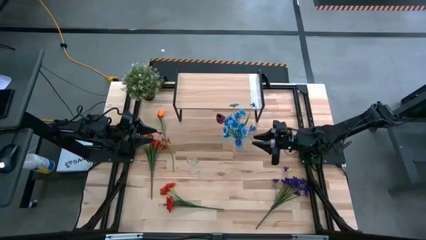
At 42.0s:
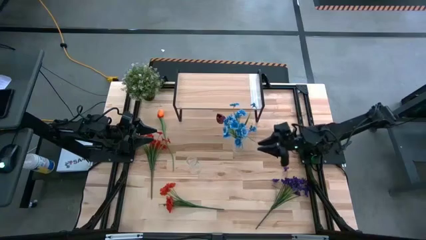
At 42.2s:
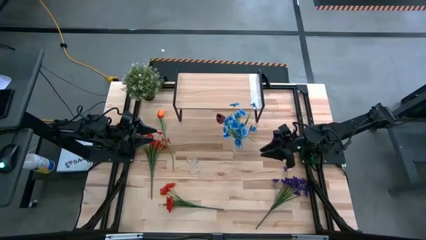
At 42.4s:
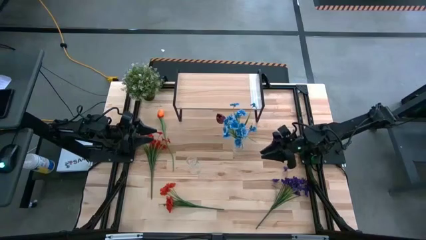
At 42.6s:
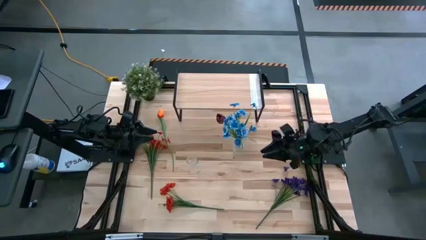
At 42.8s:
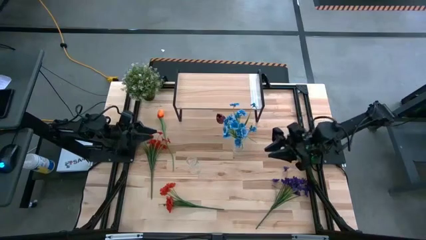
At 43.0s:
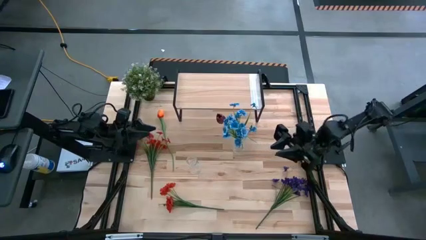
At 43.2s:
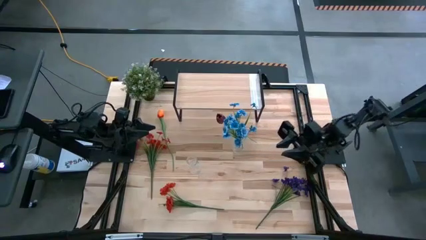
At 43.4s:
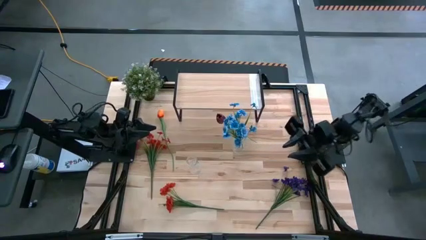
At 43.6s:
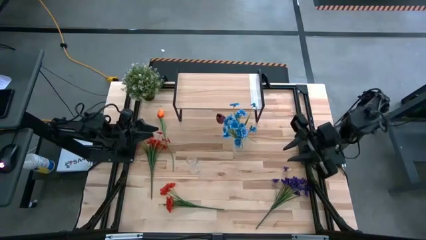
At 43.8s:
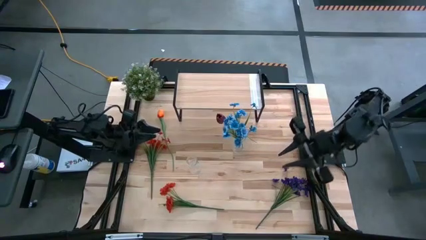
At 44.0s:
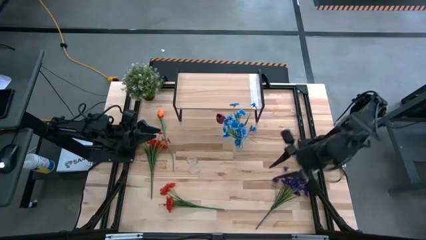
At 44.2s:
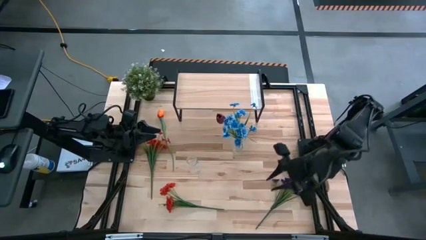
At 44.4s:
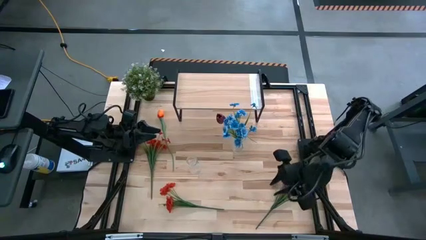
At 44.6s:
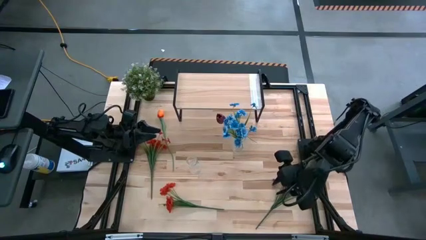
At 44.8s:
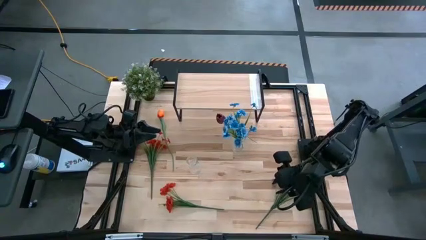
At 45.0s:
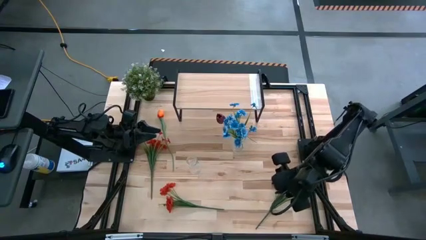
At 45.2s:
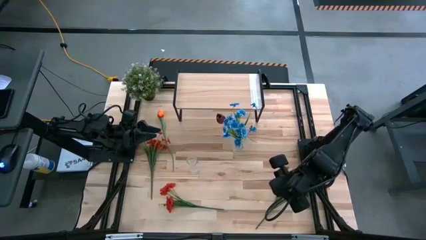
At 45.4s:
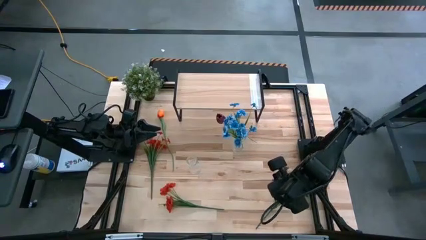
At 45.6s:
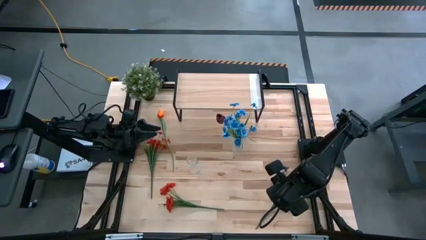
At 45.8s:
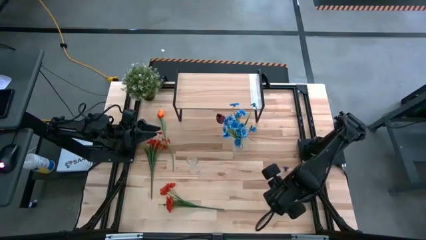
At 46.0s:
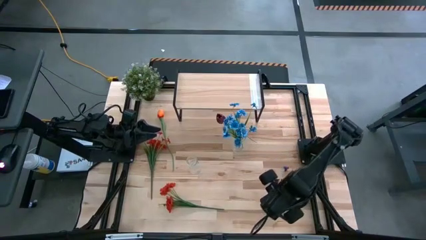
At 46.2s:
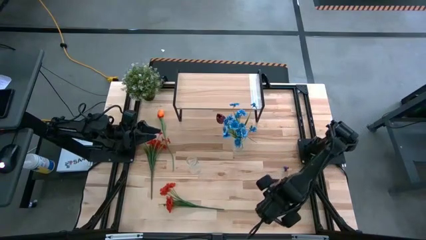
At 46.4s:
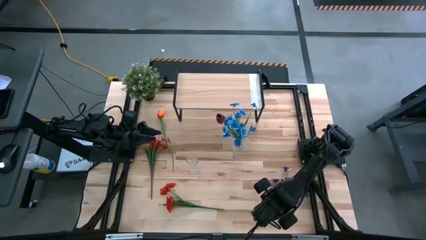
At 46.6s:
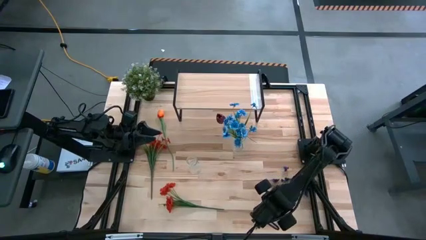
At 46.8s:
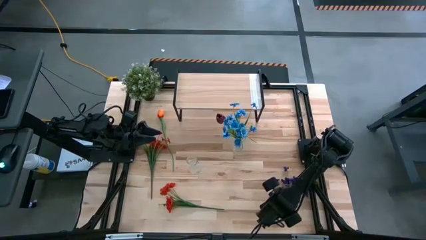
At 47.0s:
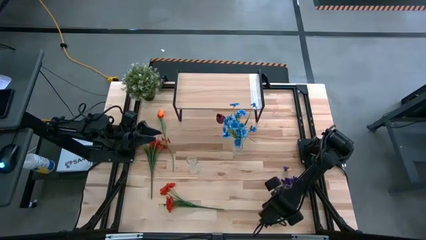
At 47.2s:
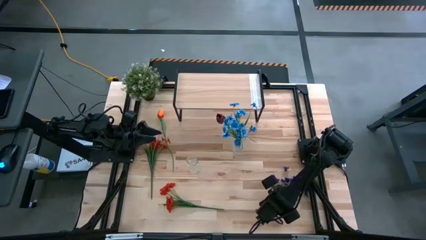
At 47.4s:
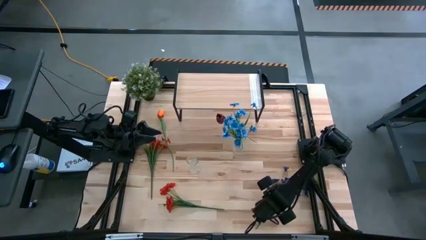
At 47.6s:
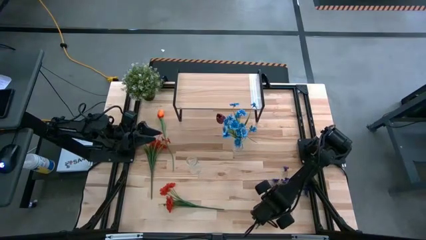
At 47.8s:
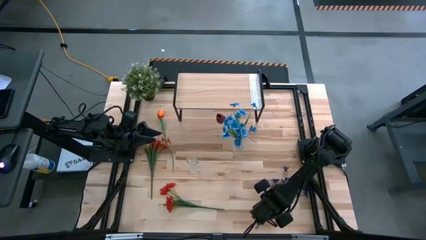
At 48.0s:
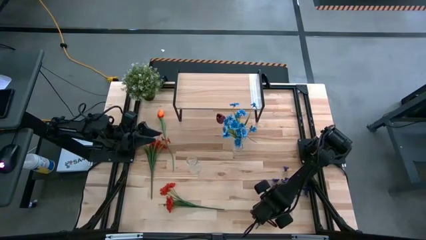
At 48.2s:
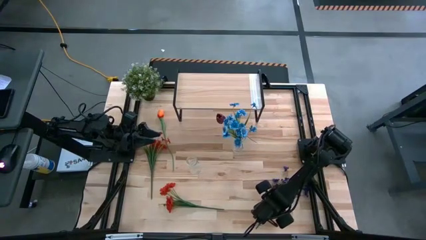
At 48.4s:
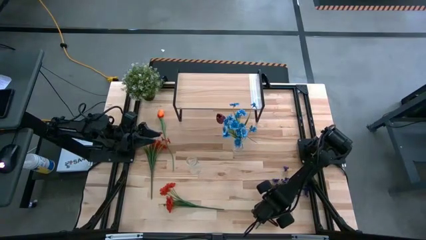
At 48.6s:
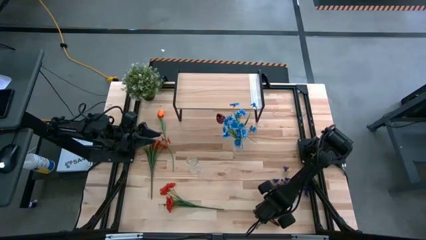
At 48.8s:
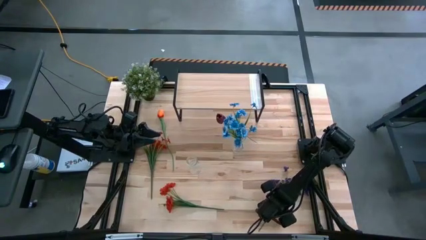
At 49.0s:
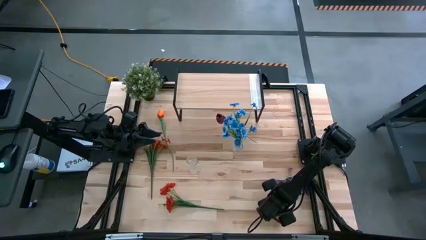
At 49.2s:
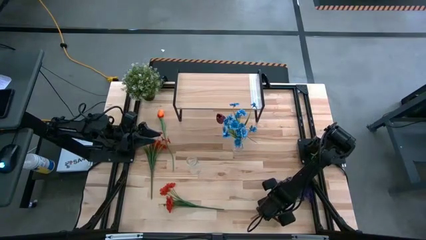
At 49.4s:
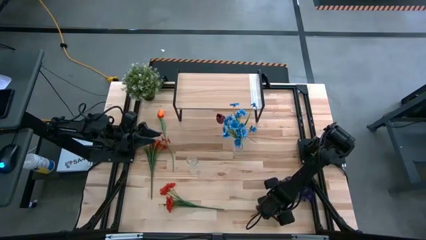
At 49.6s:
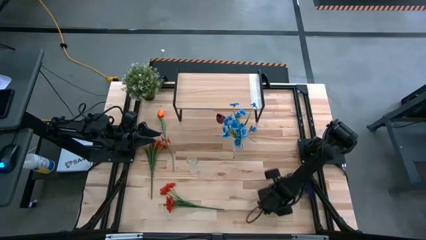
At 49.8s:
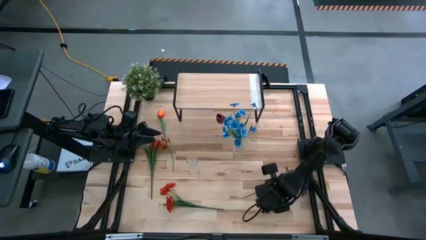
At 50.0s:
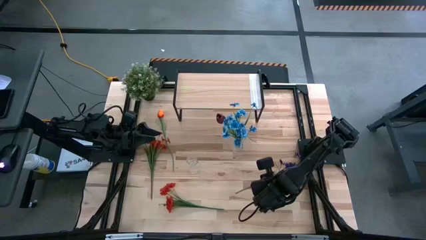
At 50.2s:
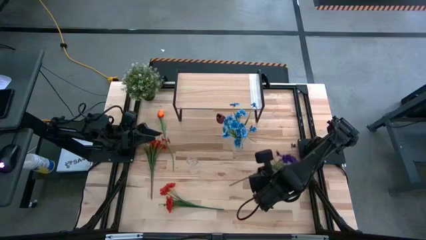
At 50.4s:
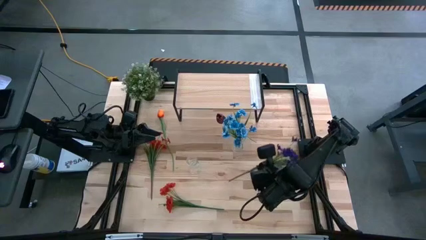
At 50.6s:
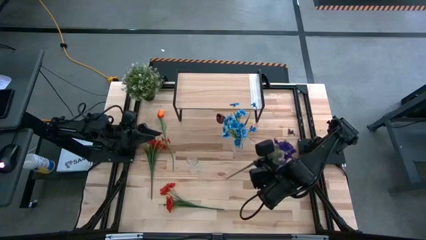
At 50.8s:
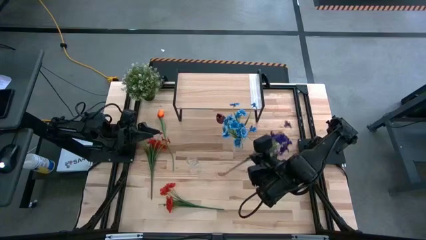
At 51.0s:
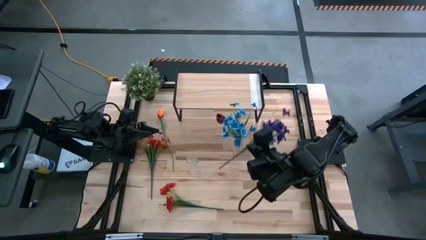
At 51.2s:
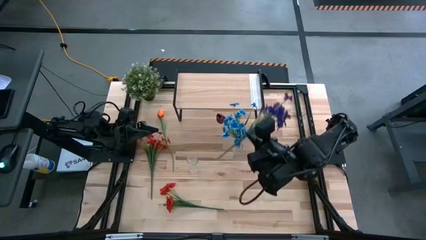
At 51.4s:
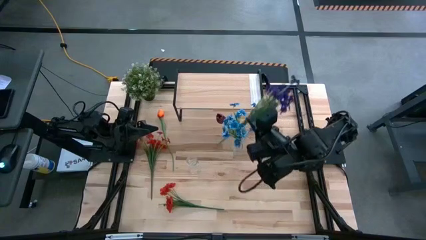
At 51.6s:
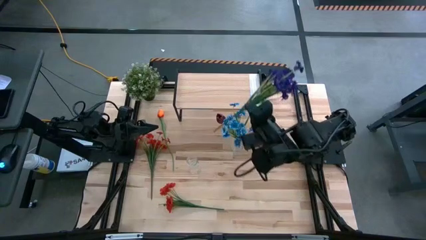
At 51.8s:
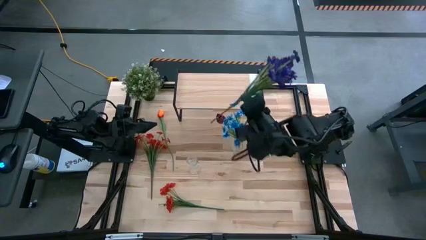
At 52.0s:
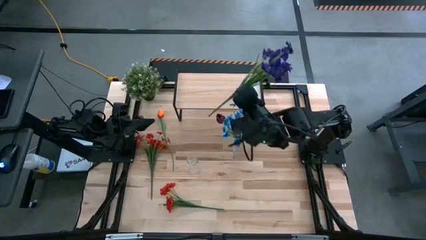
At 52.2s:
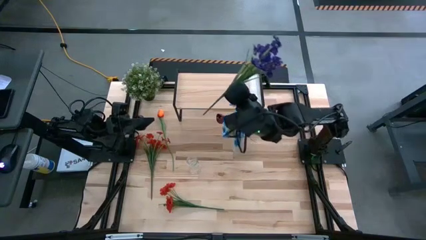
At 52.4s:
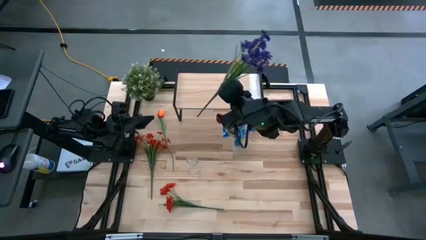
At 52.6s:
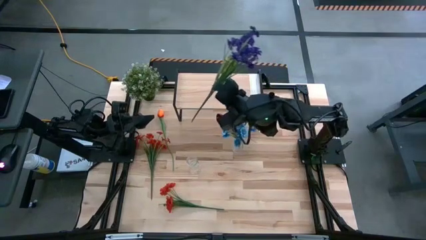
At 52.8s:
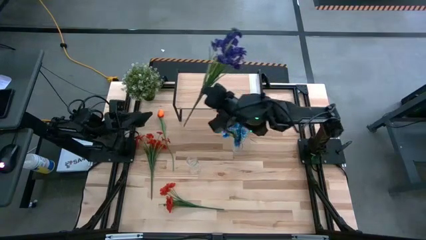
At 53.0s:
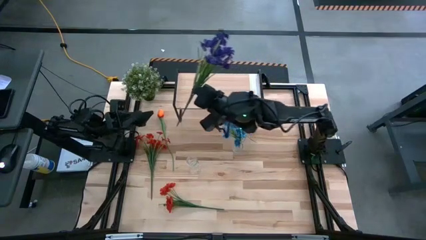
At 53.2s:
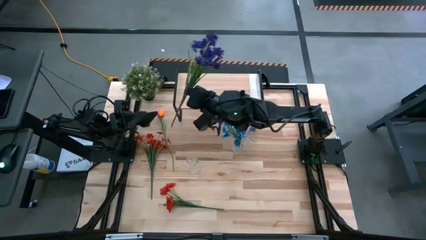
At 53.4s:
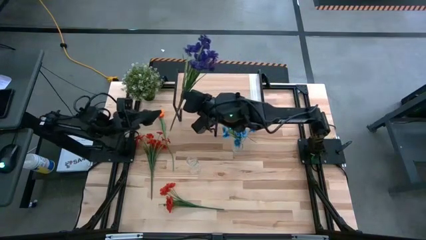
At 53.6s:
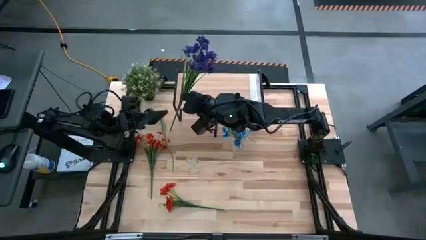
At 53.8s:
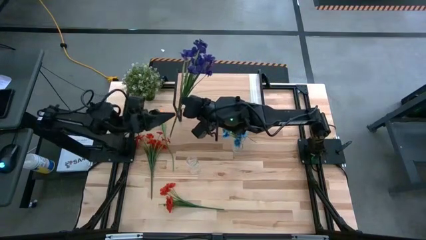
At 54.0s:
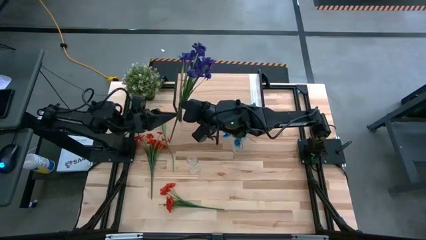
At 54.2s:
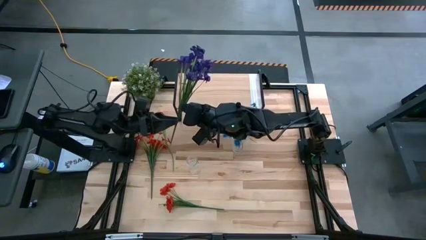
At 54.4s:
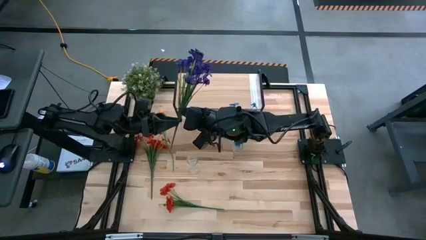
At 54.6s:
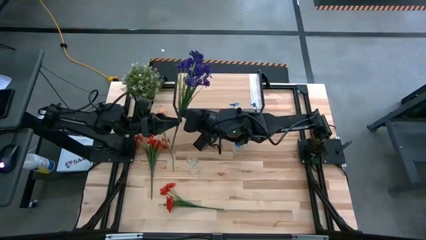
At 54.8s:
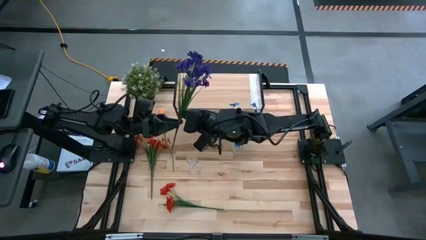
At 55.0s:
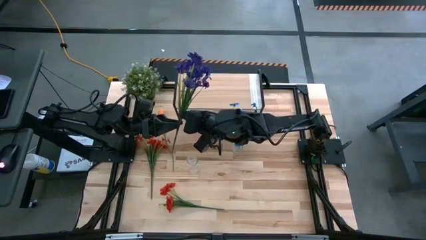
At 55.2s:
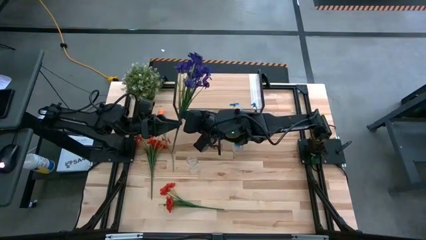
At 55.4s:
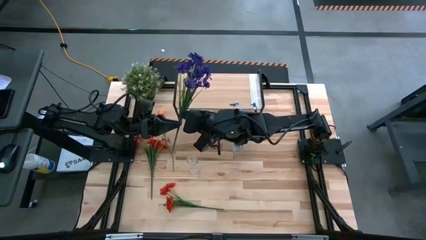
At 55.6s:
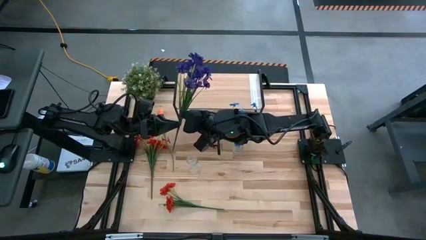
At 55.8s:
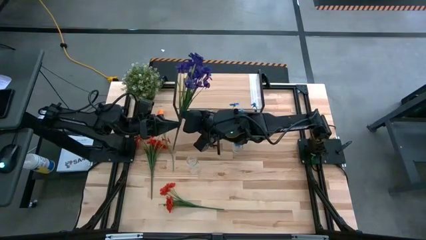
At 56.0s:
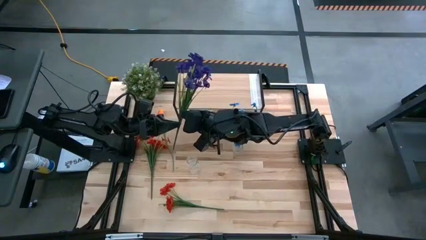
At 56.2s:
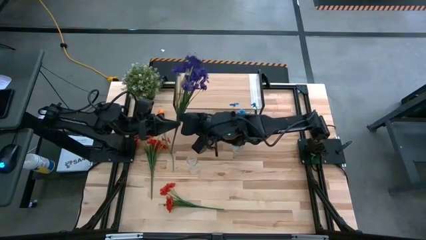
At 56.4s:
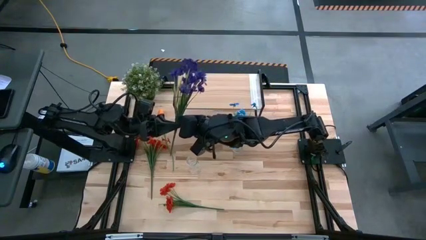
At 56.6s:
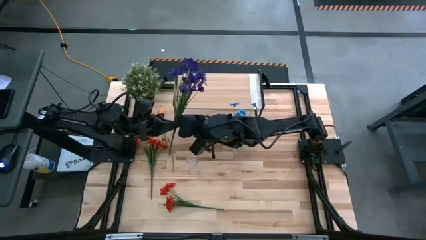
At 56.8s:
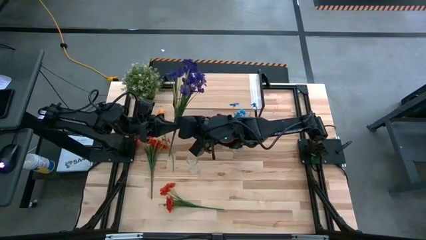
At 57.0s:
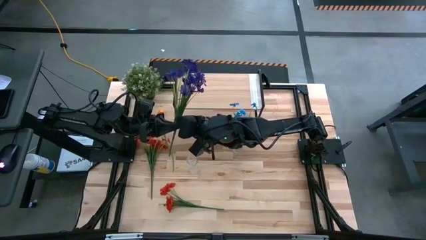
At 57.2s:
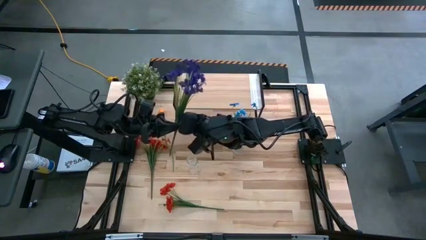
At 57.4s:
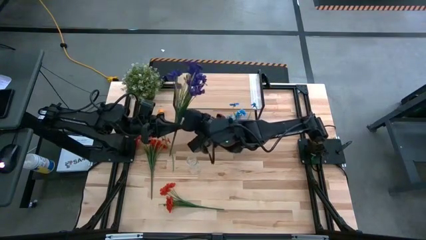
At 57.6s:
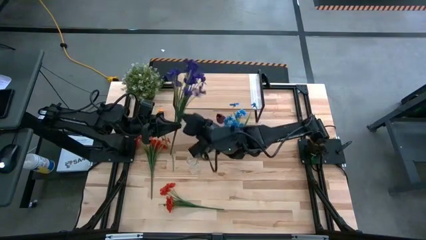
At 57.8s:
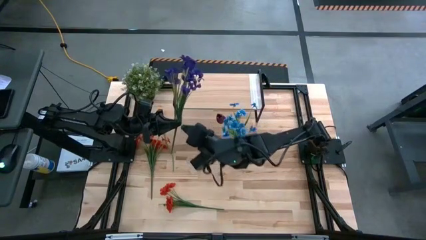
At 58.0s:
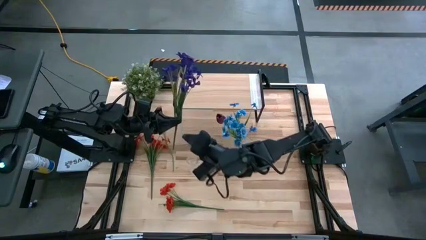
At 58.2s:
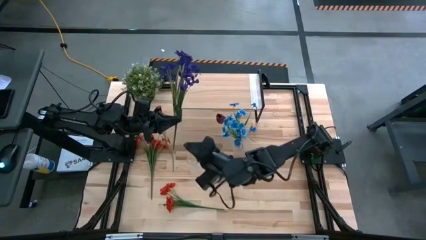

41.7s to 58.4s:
Task: Pick and place flowers into a vace then onto a shelf
Put the purple flower into the right transparent vase

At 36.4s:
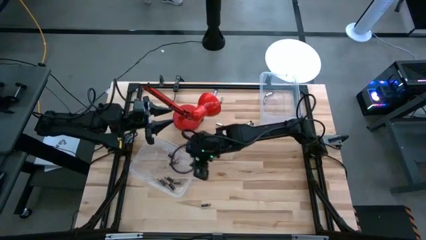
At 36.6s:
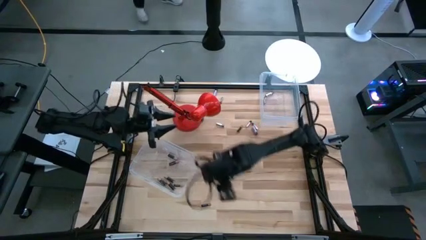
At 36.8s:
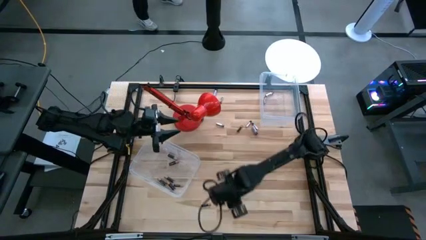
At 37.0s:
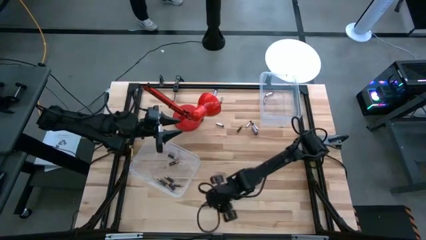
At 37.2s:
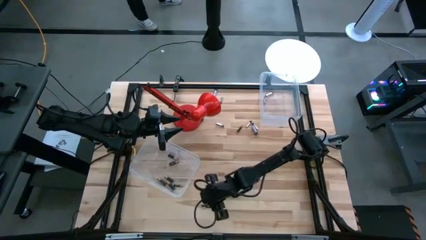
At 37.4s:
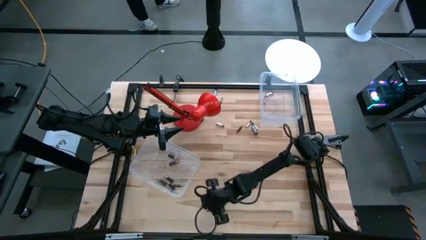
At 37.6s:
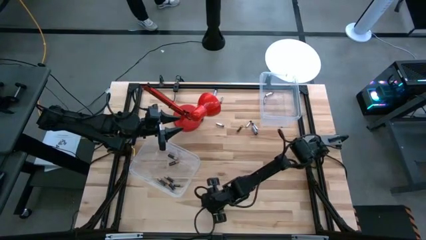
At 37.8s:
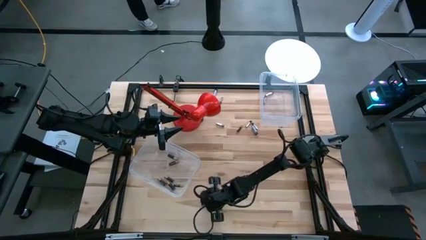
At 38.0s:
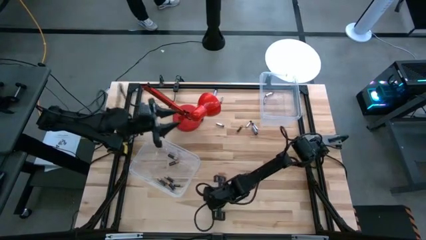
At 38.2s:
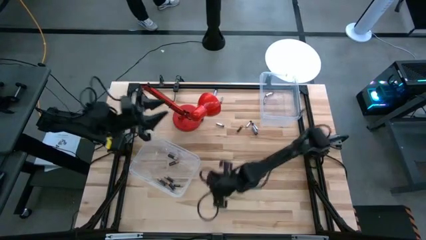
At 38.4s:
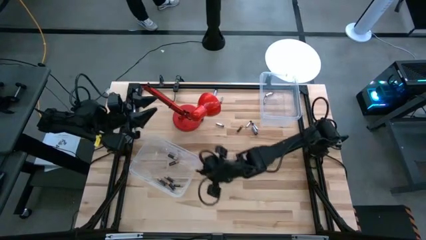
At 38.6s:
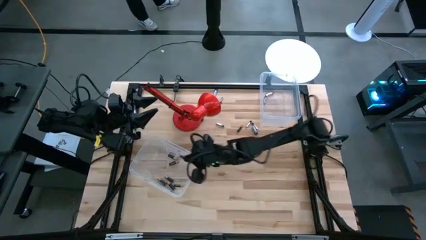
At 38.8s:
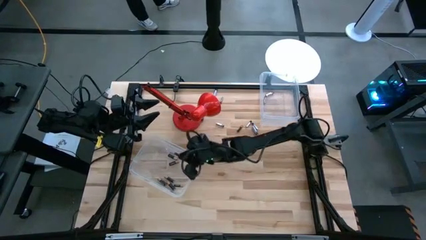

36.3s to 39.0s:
Task: Sort batteries
Put the black battery into the bottom transparent bin
